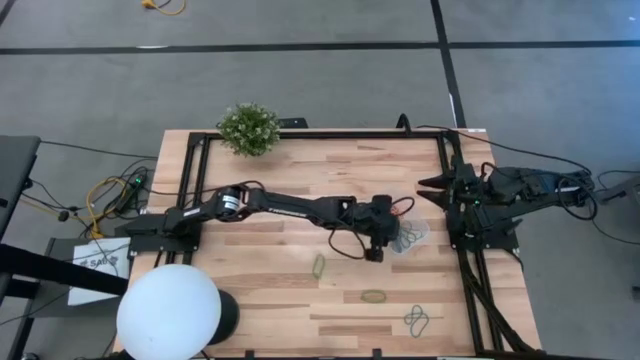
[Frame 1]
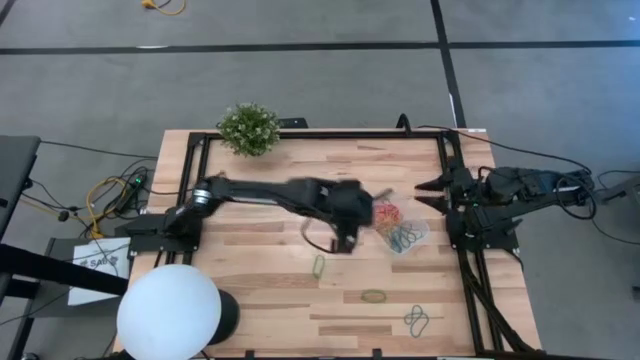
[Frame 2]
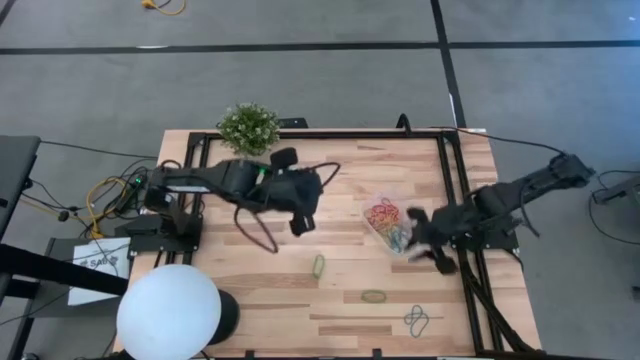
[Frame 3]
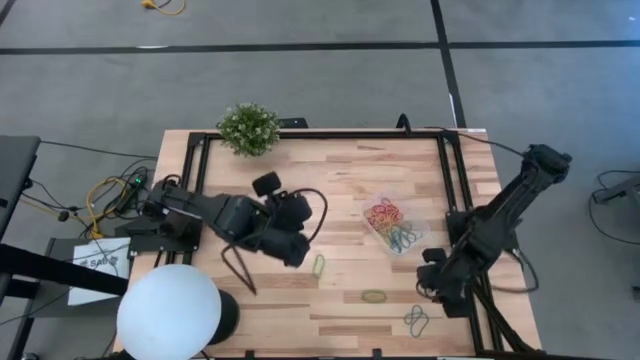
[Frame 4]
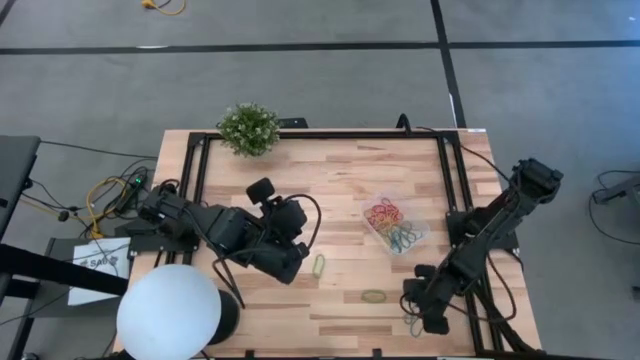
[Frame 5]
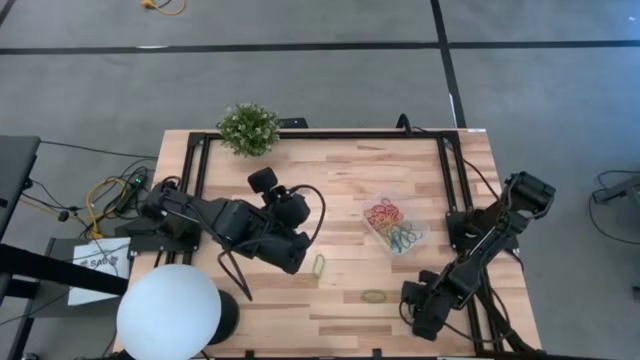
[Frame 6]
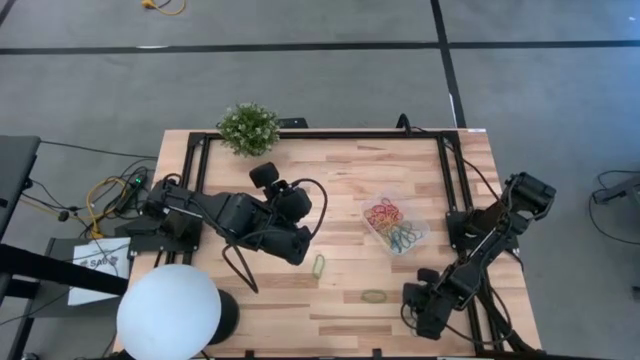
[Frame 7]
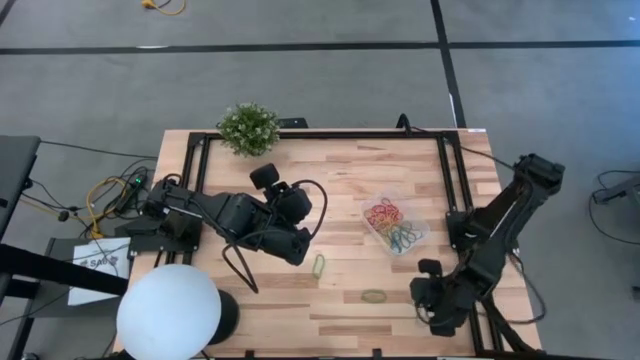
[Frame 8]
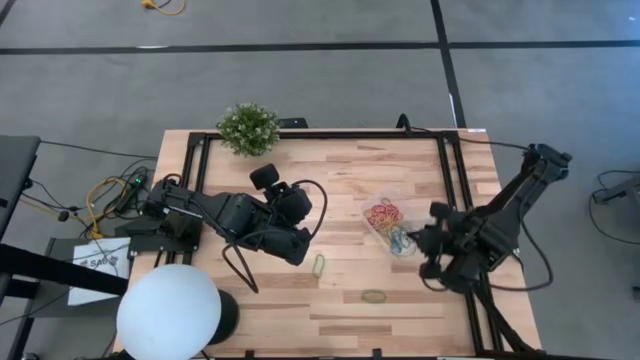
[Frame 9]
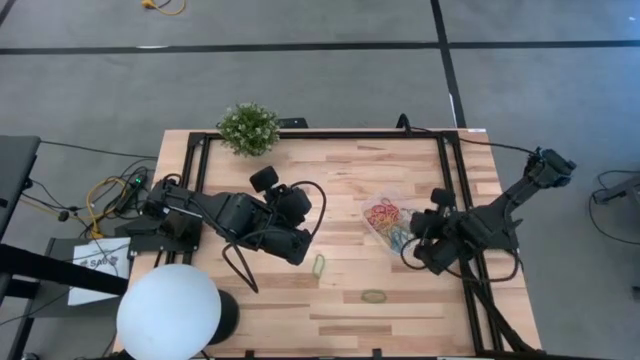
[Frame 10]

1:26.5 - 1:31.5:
Task: Pick and place items into bin
Put the blue rubber band into the transparent bin

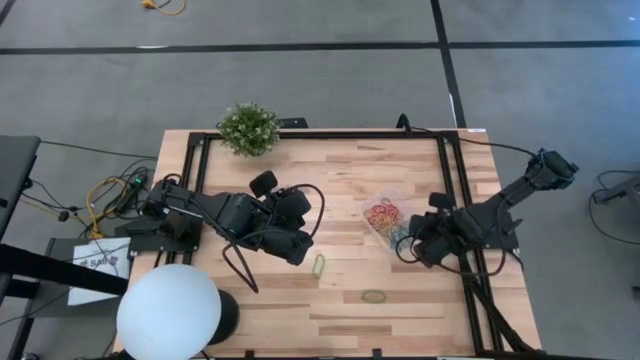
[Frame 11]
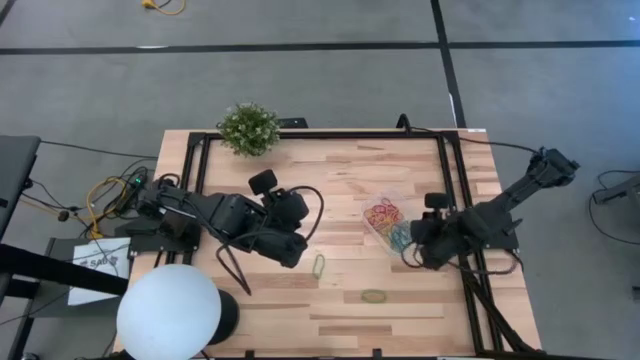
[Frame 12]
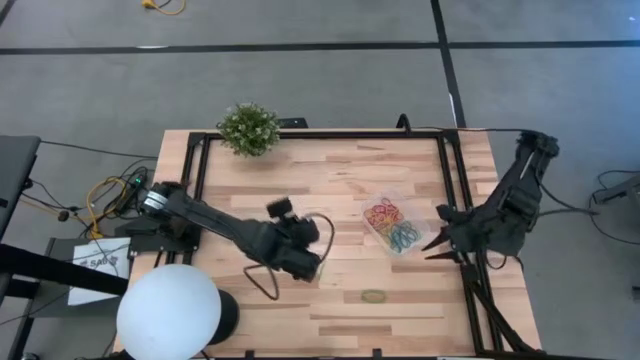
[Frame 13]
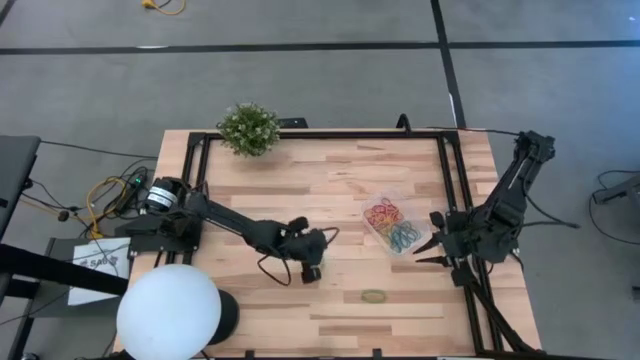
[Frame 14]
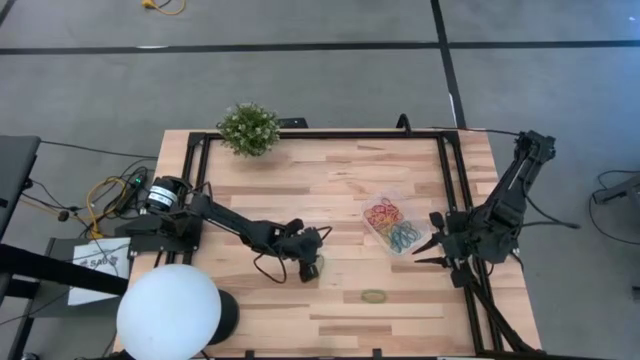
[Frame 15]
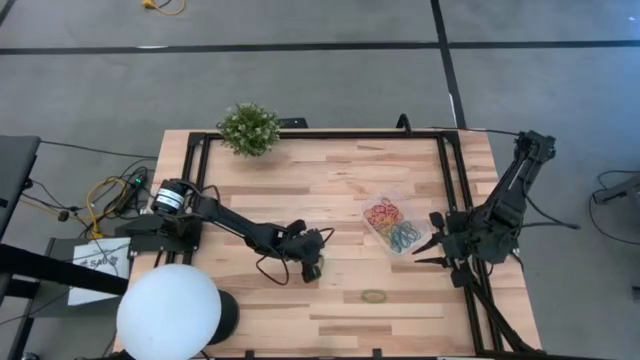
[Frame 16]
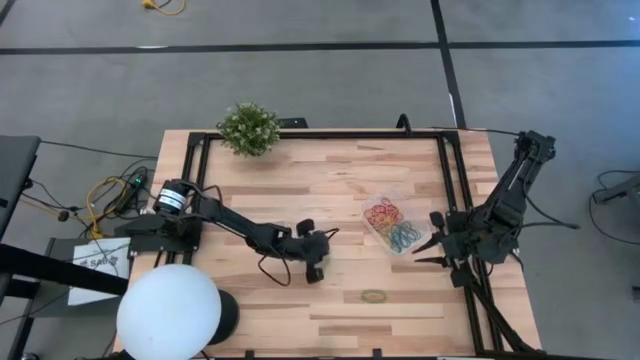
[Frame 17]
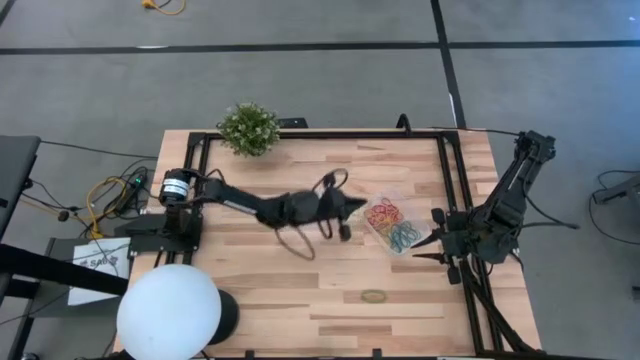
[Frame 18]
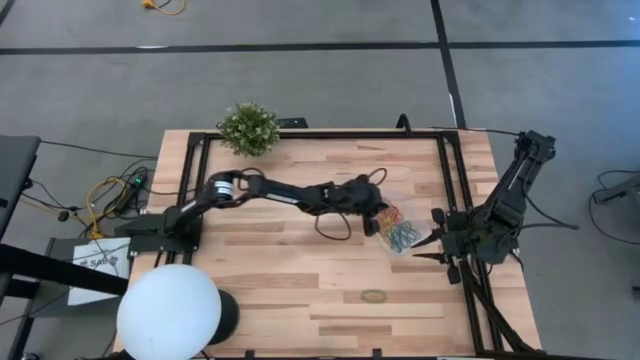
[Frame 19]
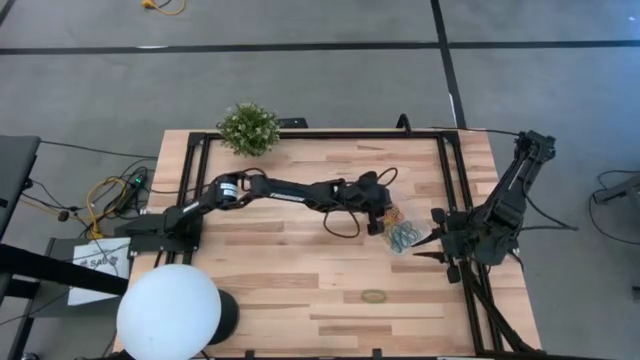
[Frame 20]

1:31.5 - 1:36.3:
Put the green rubber band into the transparent bin

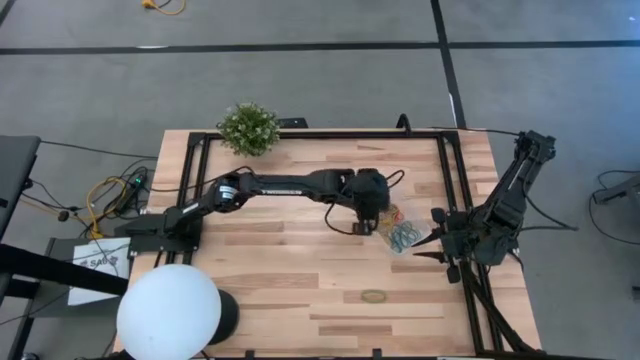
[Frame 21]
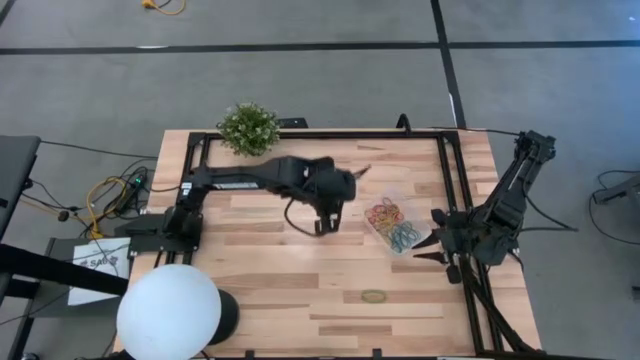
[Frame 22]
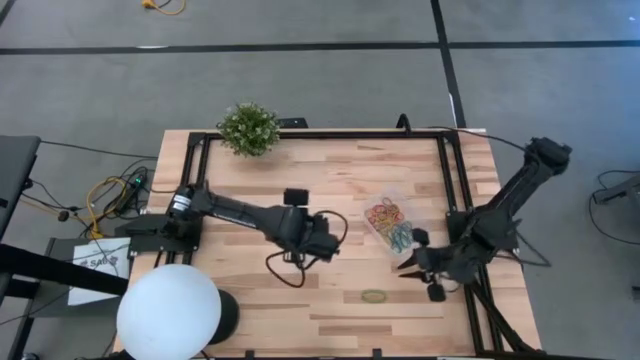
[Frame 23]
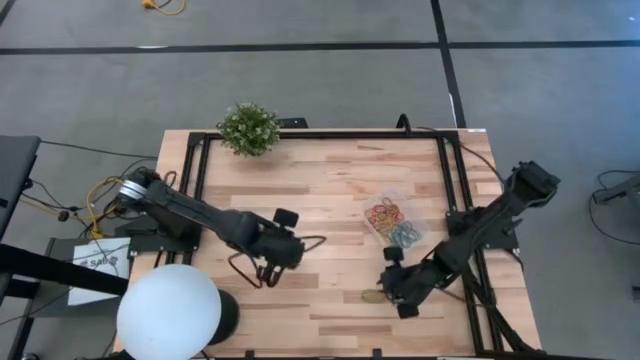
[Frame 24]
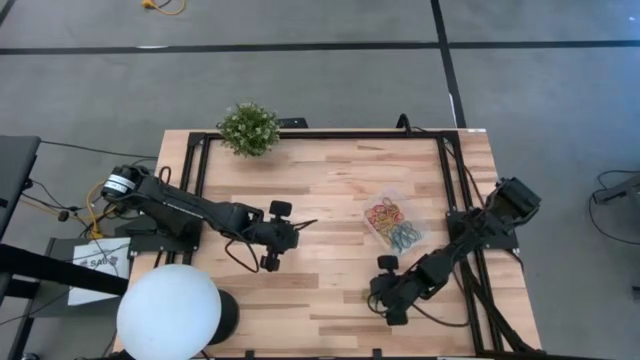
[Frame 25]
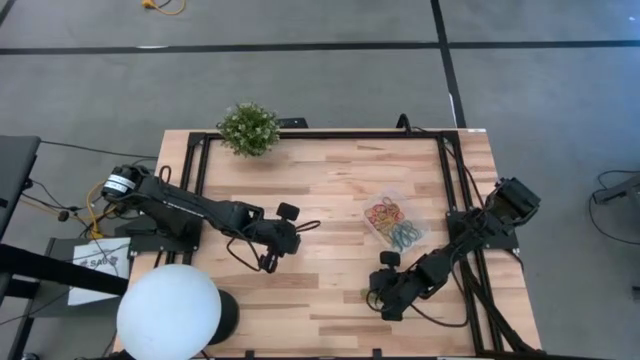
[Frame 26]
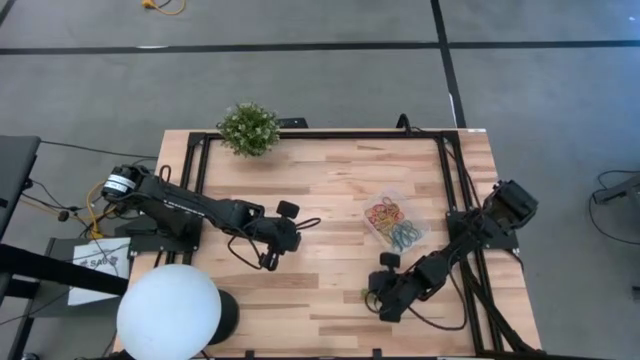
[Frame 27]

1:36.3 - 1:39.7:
Put the green rubber band into the transparent bin

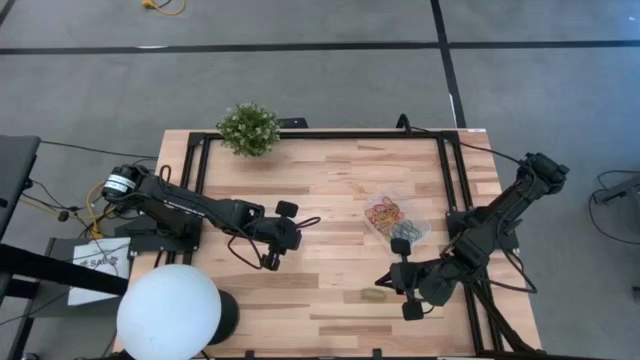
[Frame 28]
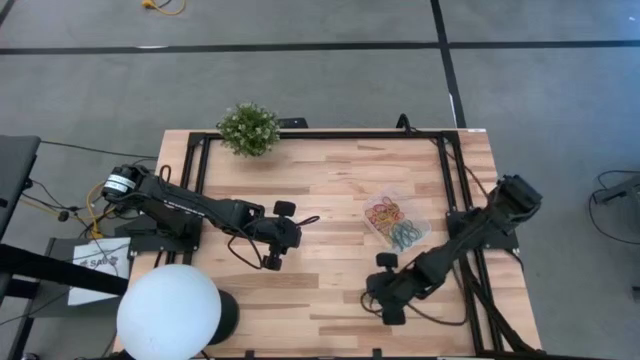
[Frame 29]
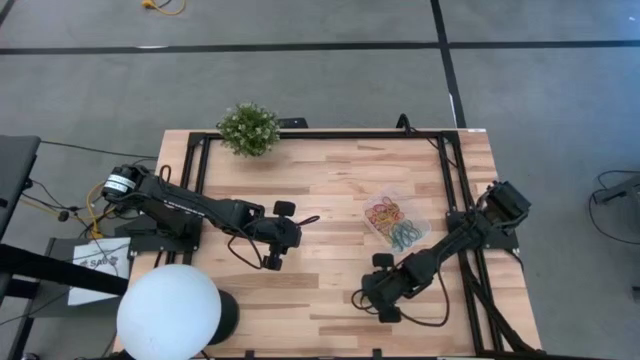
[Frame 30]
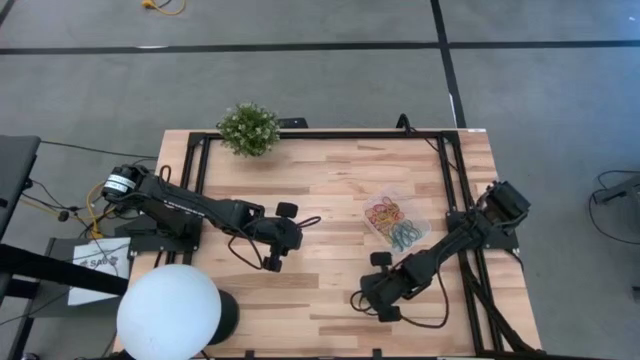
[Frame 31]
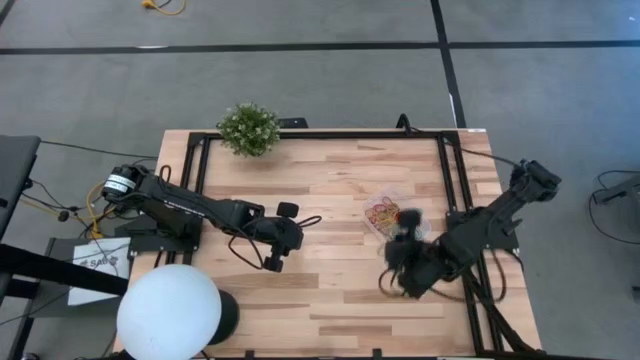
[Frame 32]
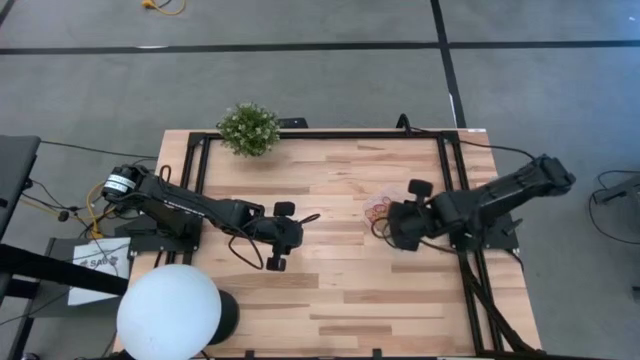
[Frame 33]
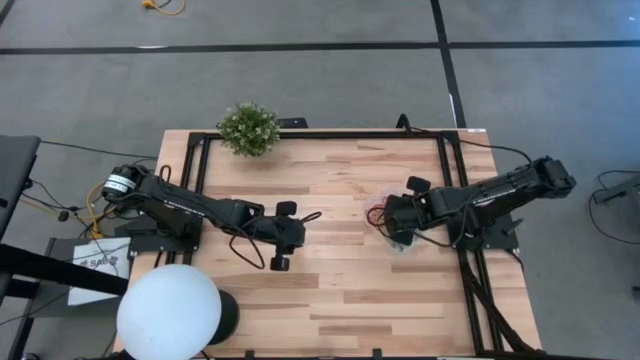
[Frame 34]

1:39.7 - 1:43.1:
Put the green rubber band into the transparent bin
